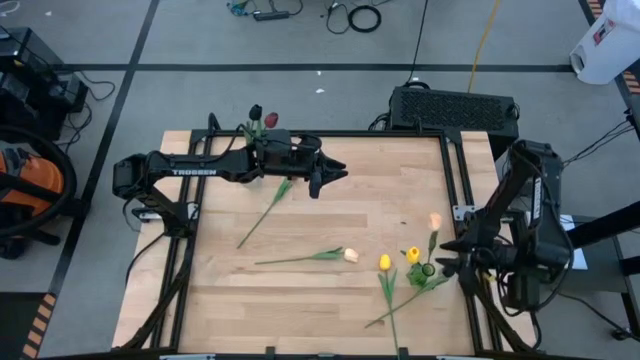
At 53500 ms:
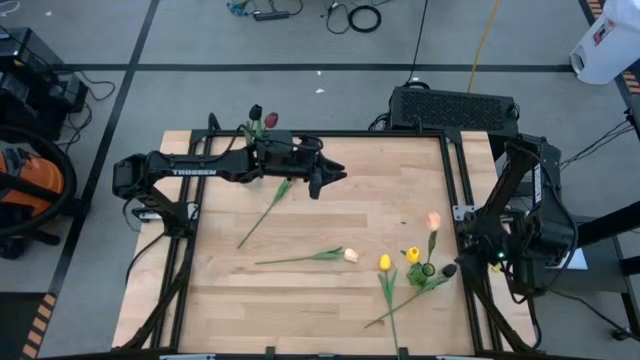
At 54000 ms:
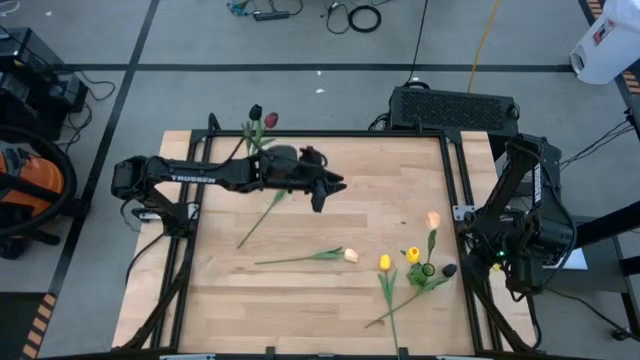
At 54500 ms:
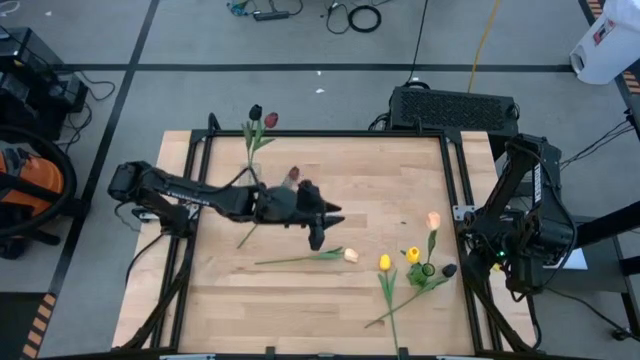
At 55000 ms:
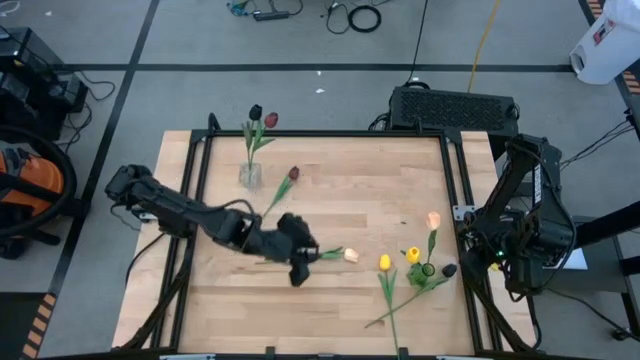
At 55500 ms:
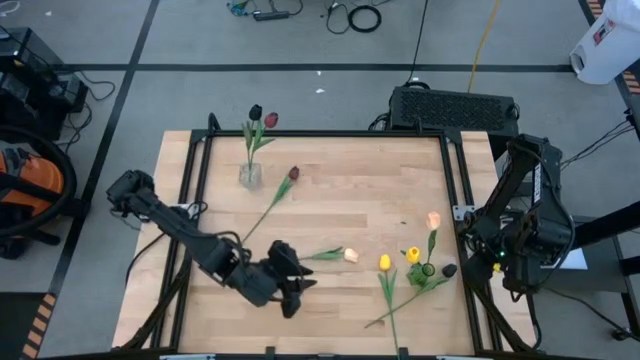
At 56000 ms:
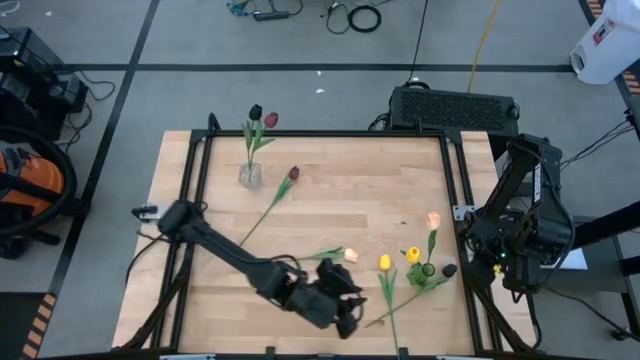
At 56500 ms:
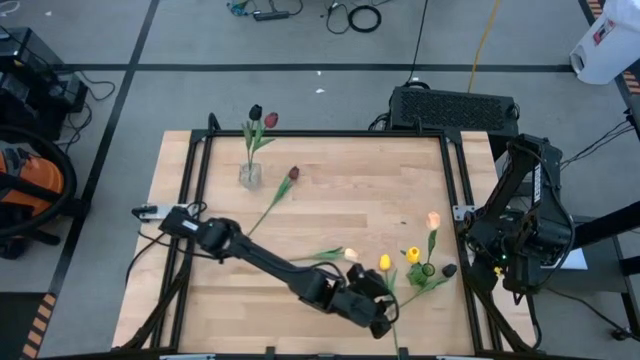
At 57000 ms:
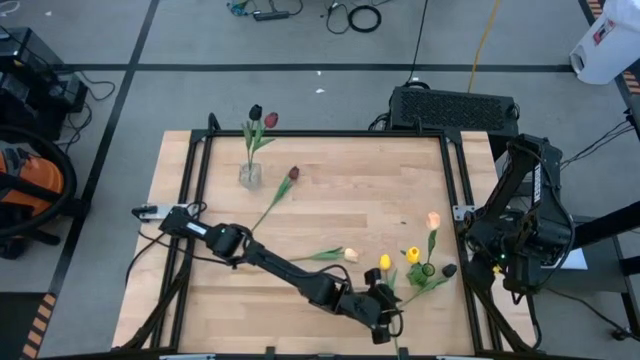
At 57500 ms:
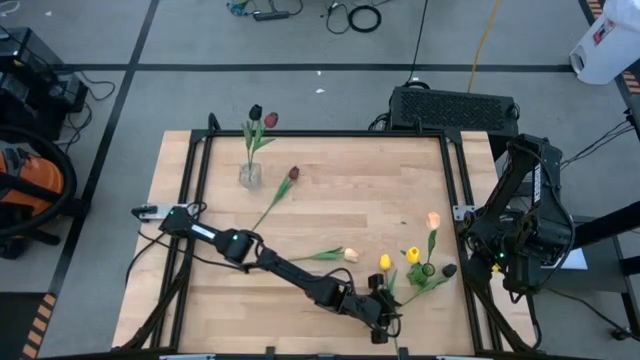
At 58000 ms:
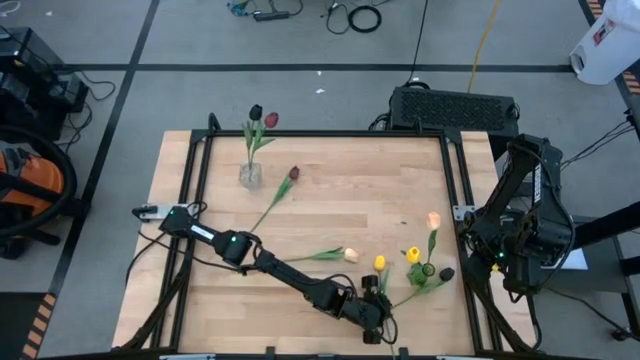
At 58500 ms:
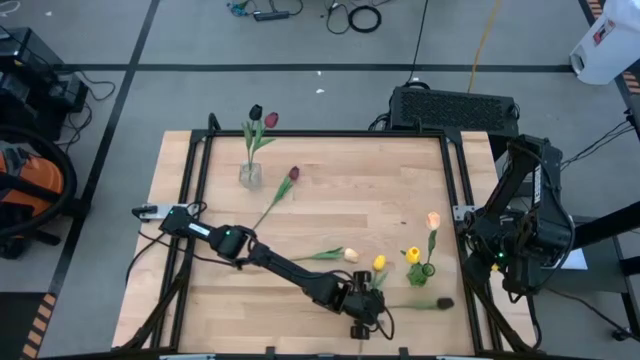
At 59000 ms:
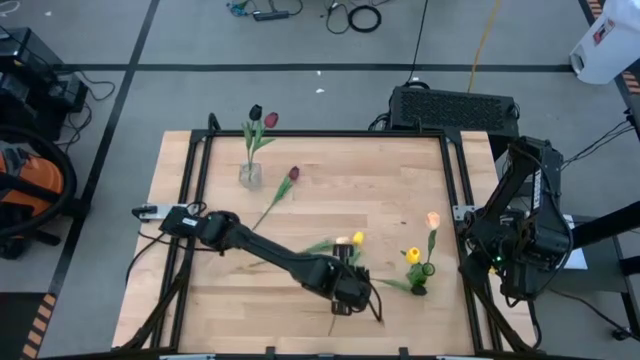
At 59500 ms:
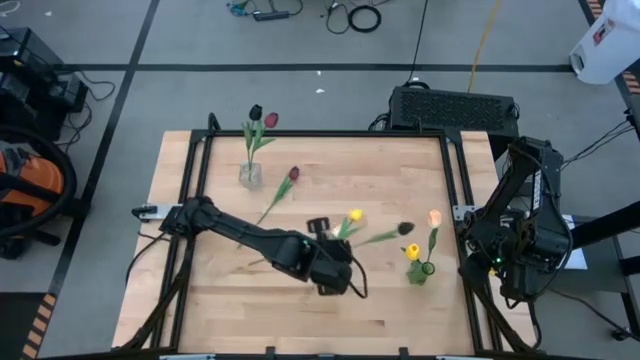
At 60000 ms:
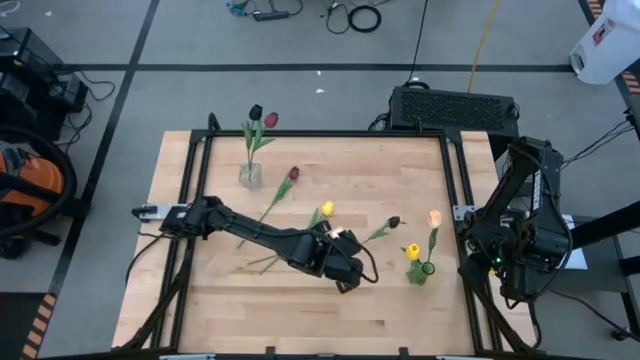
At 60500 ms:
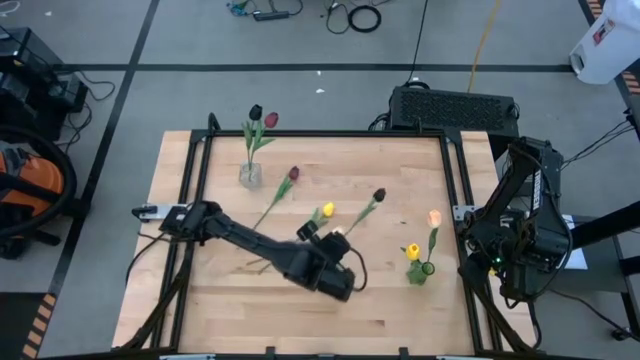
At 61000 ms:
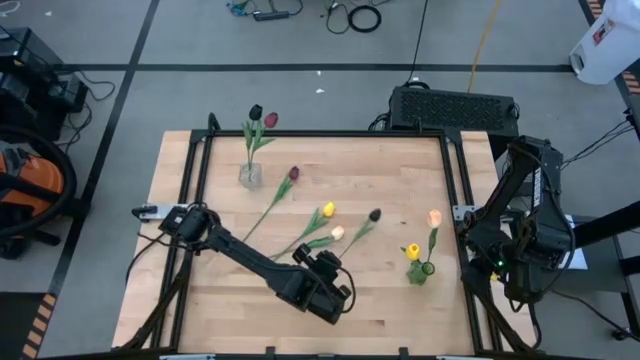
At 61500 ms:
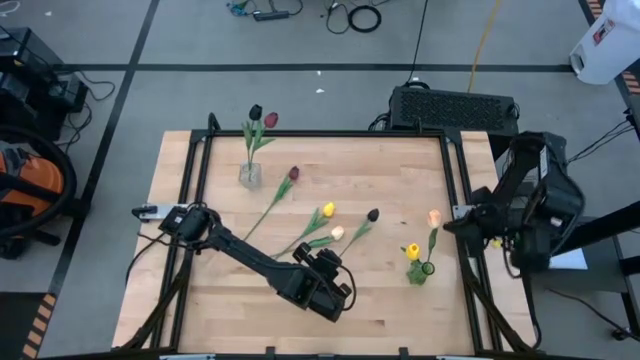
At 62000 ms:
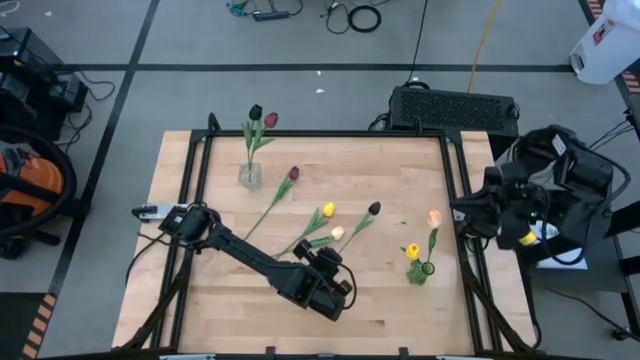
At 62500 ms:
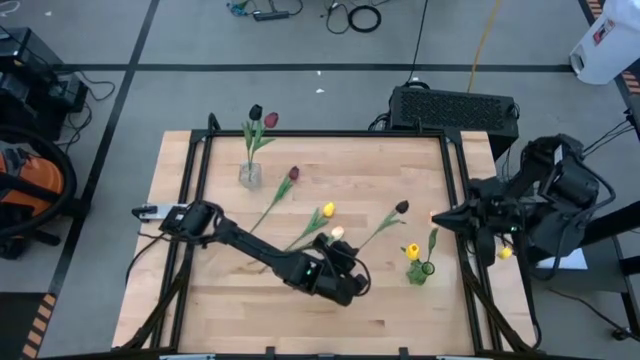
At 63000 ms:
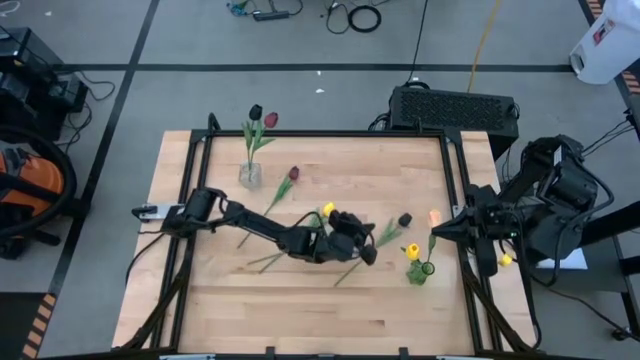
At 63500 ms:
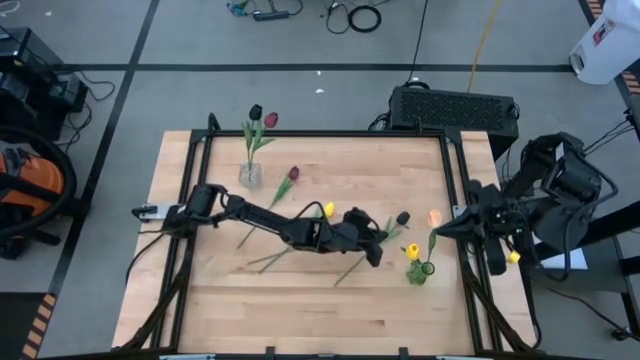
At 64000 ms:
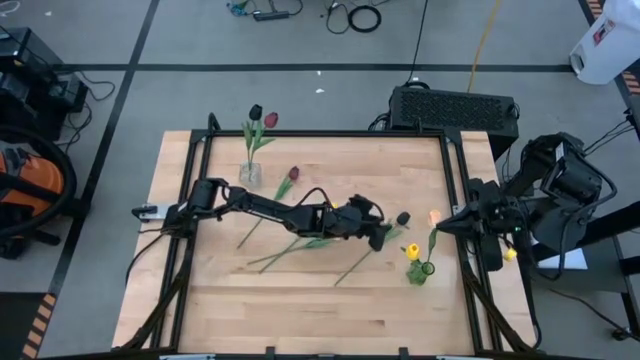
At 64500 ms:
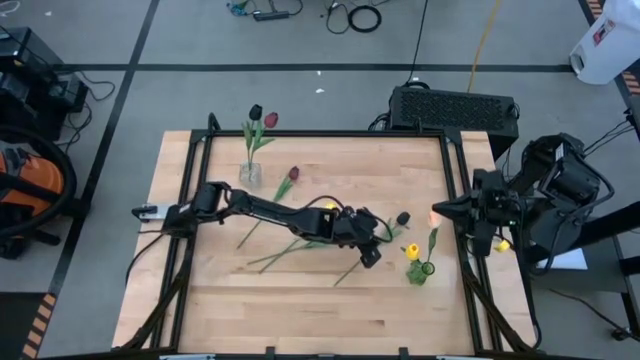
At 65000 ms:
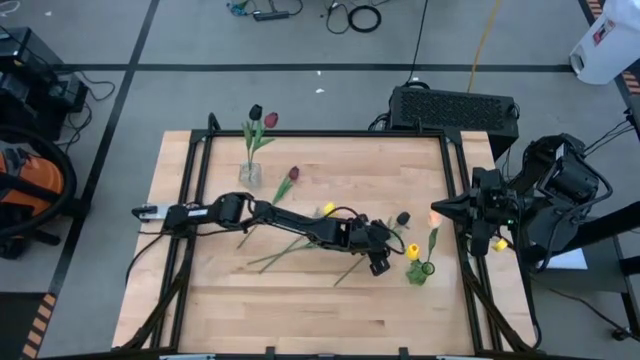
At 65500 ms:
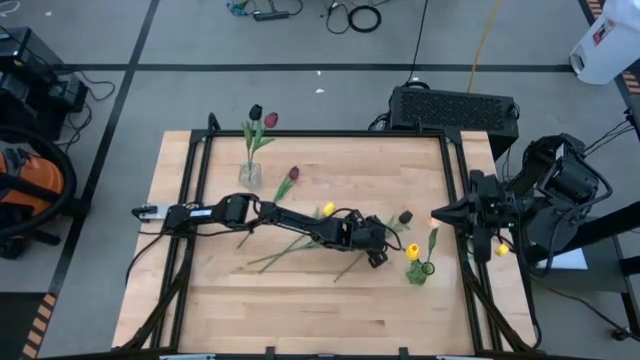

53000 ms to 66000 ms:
Task: Sort flowers into vase by color
Put the black flower into the transparent vase

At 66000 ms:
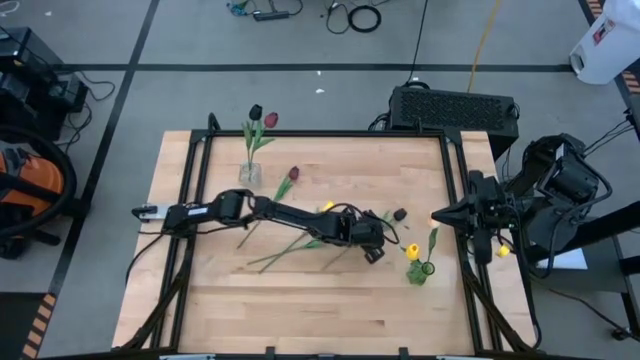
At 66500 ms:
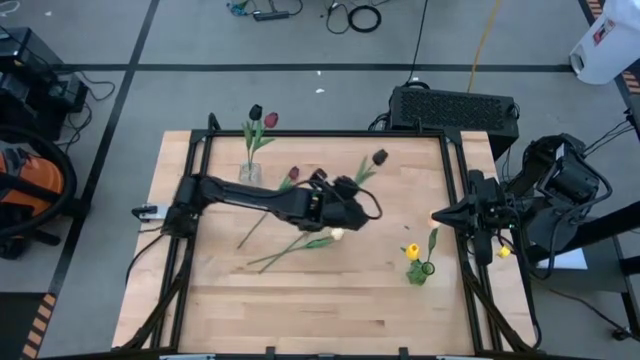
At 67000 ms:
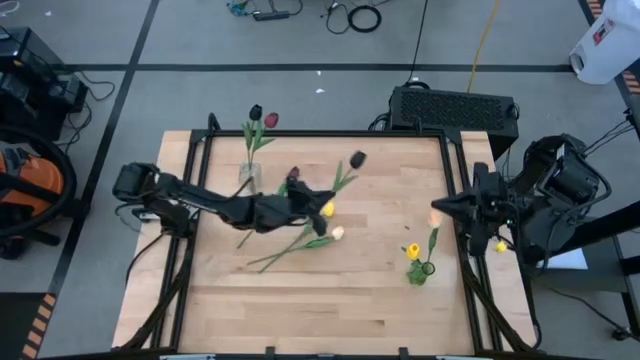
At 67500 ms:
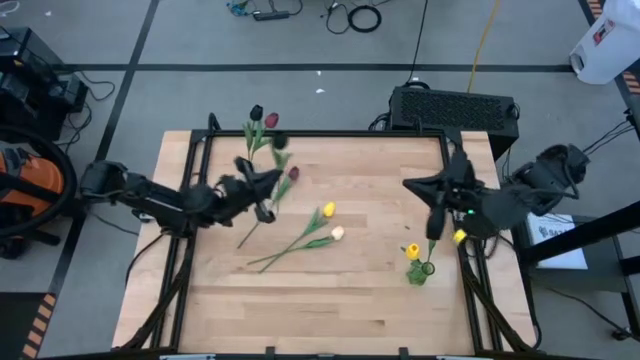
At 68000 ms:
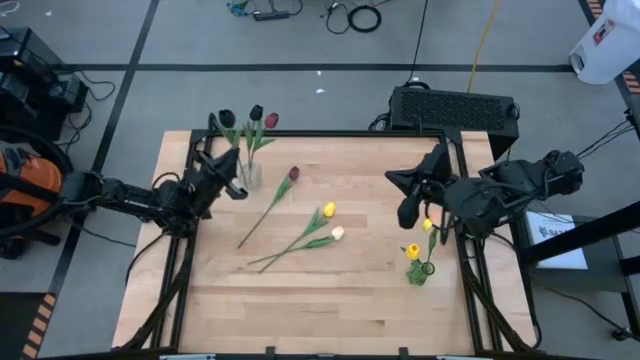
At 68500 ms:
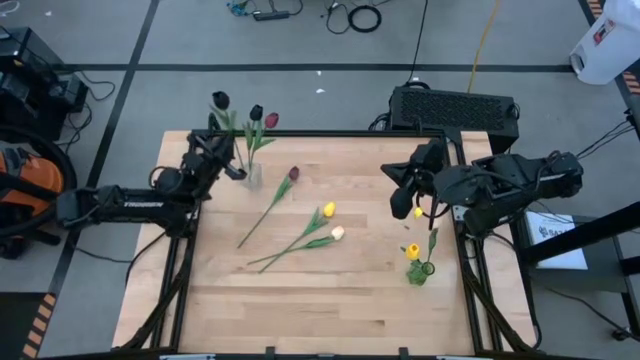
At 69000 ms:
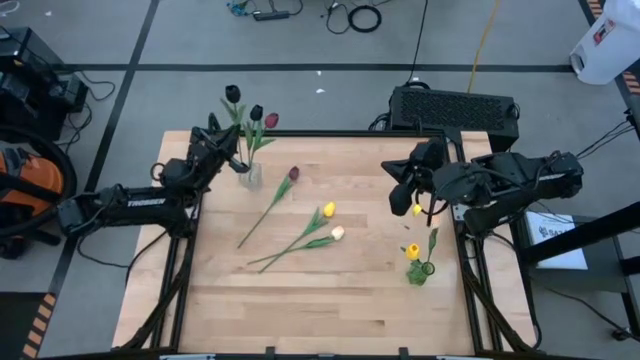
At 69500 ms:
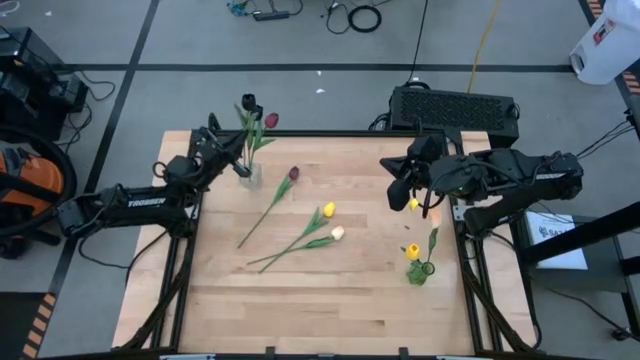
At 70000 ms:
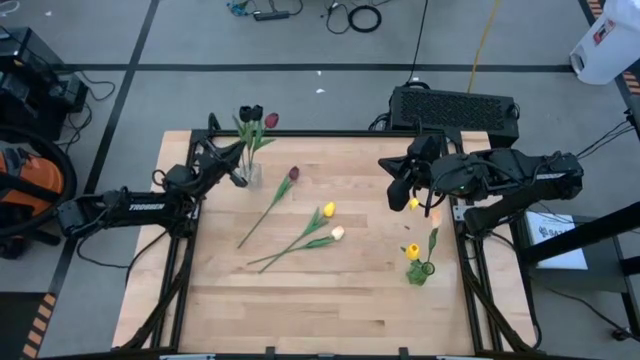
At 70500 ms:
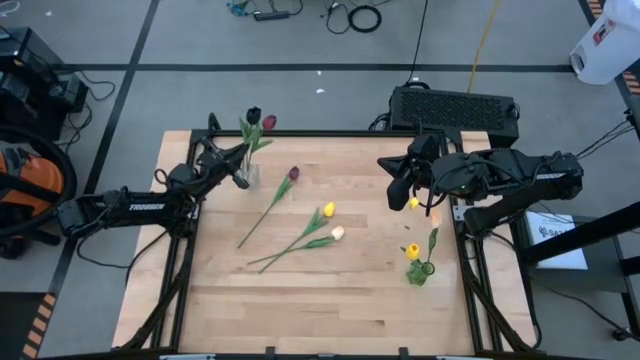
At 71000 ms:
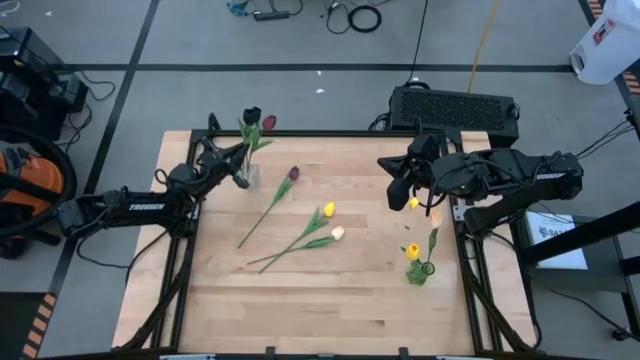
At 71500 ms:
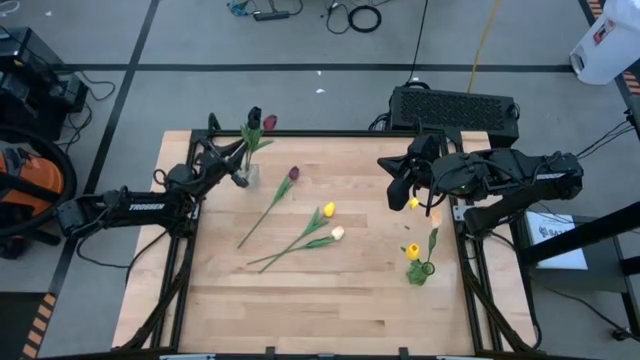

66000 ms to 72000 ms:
Put the black flower into the transparent vase

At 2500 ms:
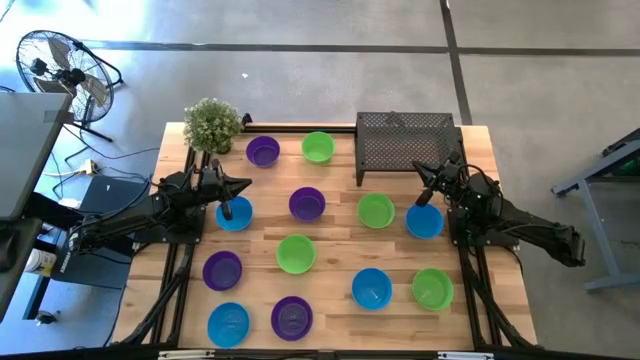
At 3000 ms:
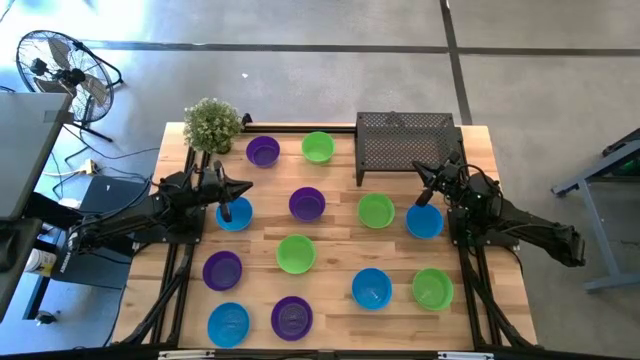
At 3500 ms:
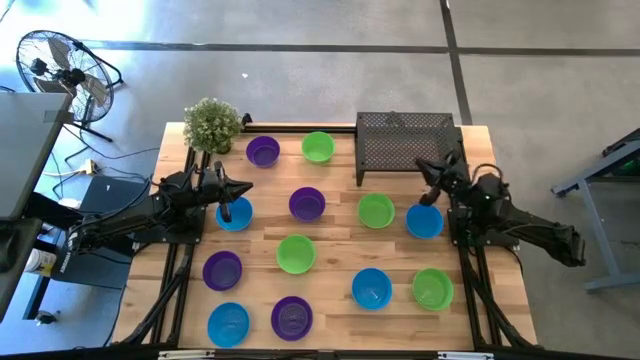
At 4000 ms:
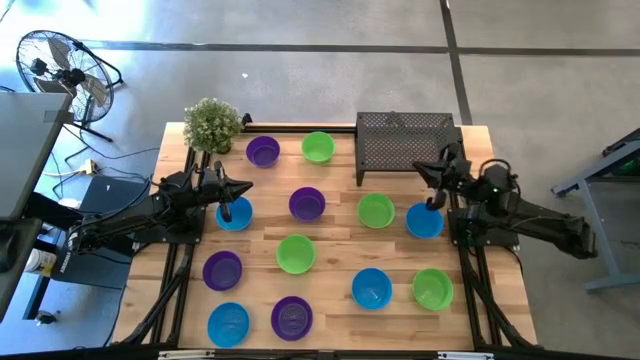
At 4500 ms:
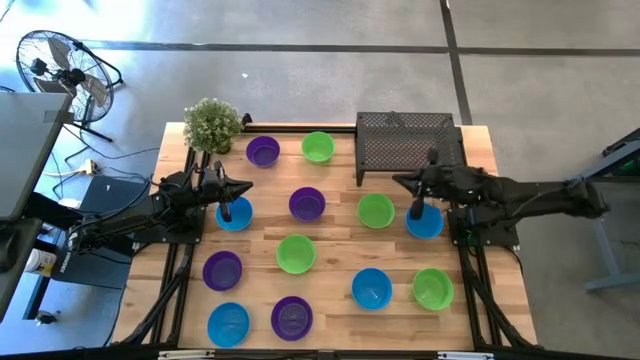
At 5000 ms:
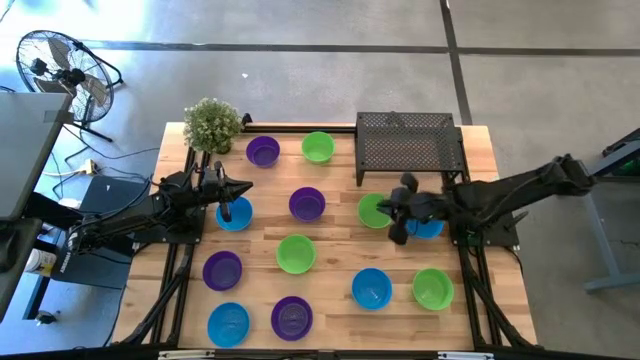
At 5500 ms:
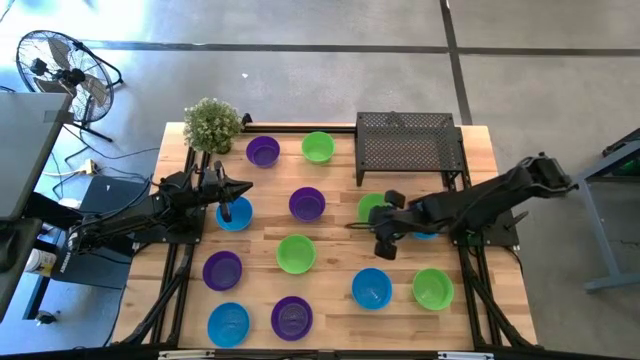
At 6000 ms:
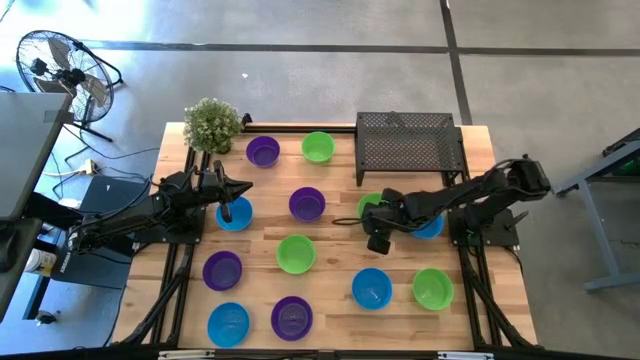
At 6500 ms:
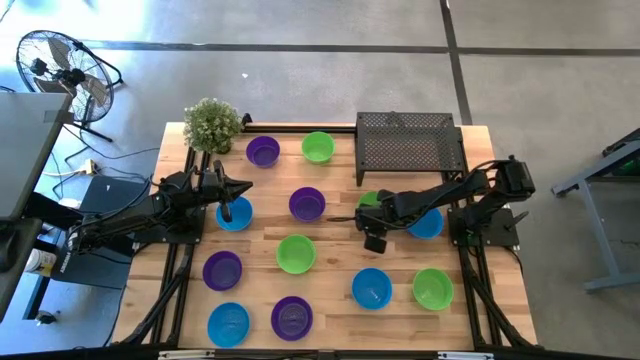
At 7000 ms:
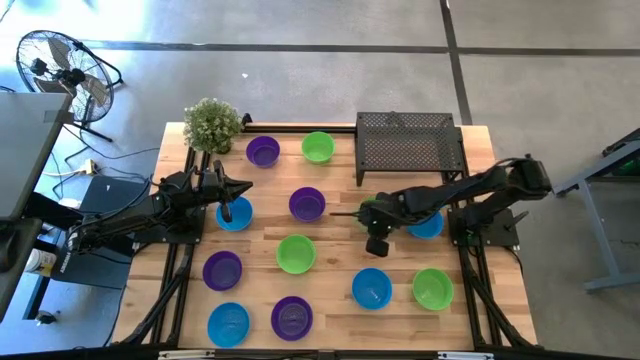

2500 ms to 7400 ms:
Task: Pick & Place Mini bowls
Put the green bowl on the shelf
